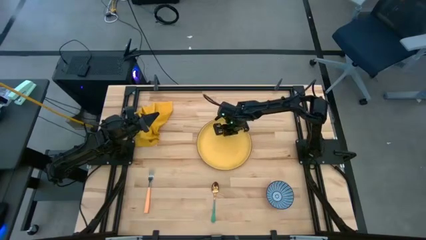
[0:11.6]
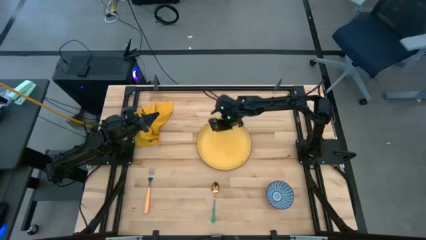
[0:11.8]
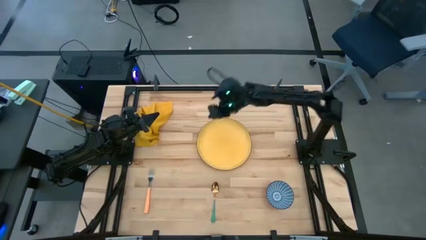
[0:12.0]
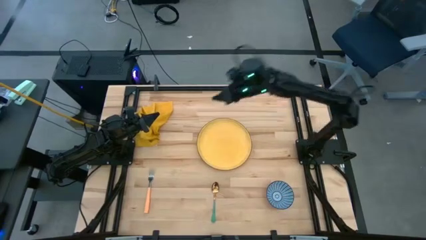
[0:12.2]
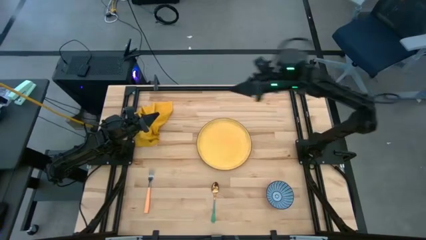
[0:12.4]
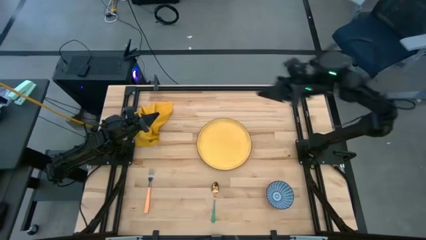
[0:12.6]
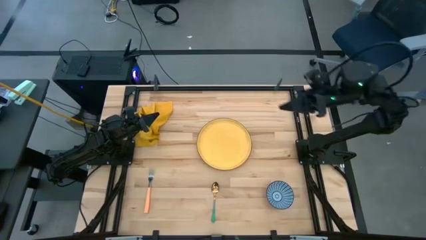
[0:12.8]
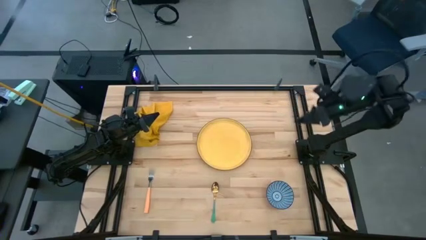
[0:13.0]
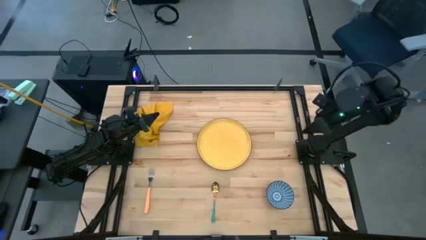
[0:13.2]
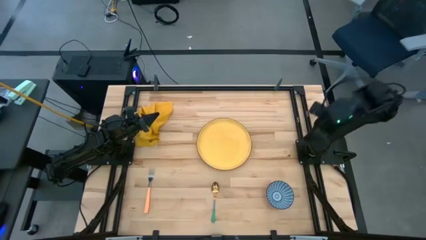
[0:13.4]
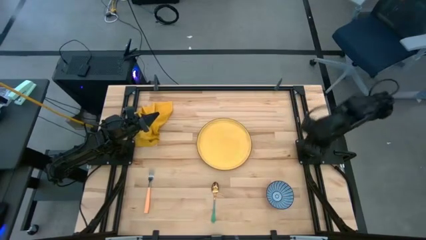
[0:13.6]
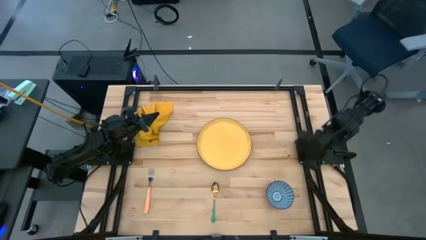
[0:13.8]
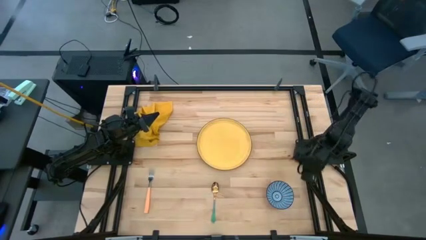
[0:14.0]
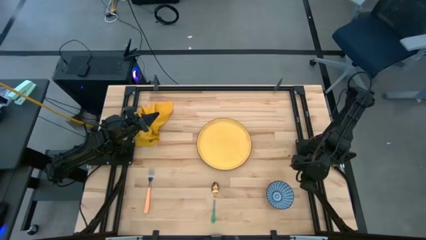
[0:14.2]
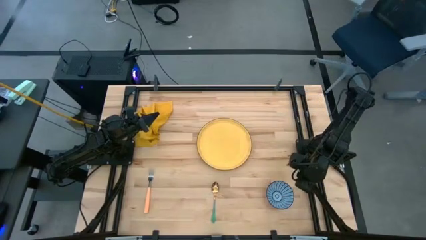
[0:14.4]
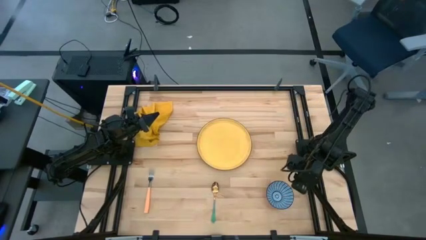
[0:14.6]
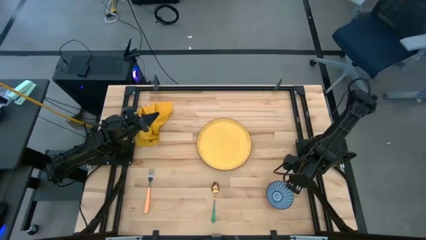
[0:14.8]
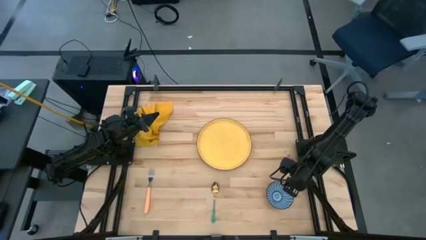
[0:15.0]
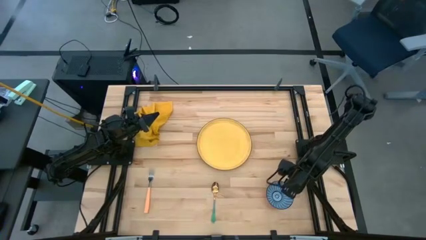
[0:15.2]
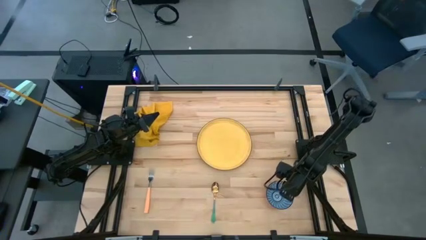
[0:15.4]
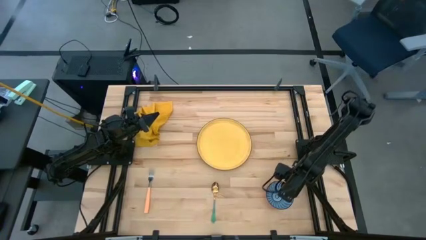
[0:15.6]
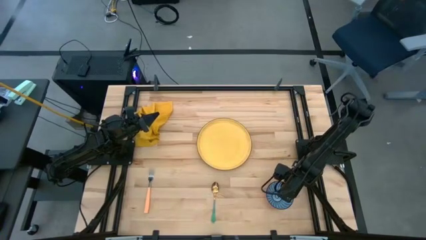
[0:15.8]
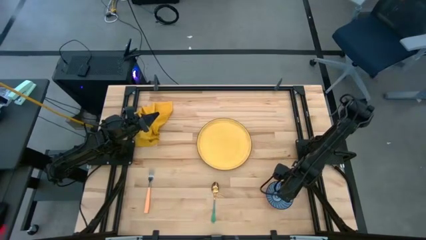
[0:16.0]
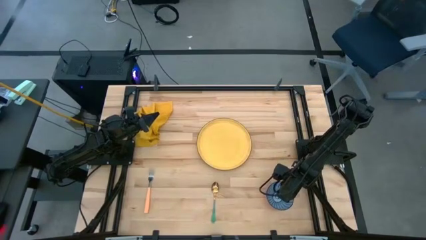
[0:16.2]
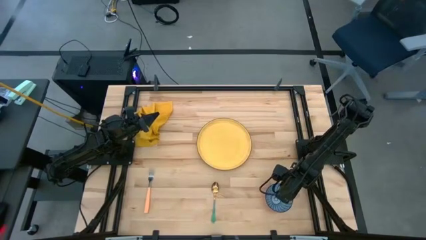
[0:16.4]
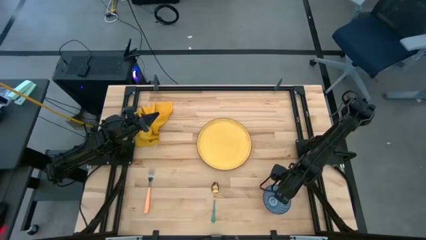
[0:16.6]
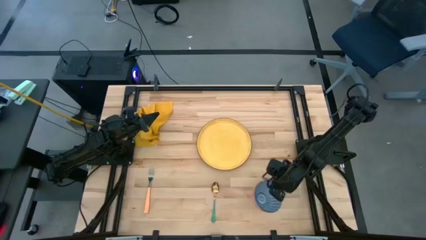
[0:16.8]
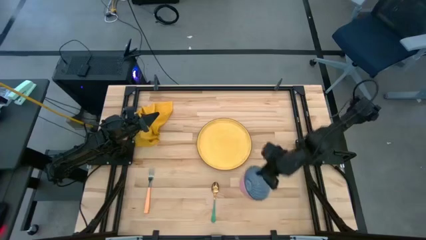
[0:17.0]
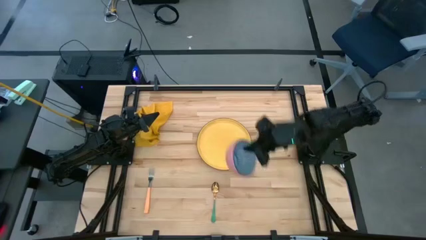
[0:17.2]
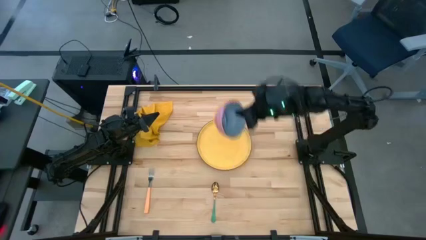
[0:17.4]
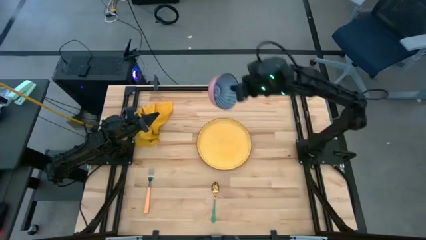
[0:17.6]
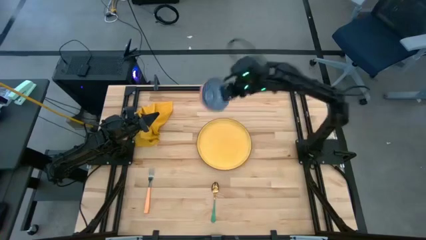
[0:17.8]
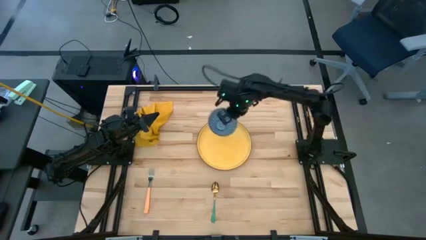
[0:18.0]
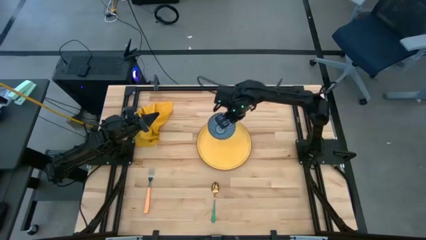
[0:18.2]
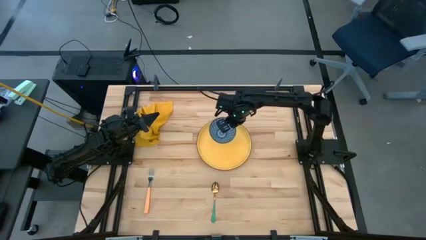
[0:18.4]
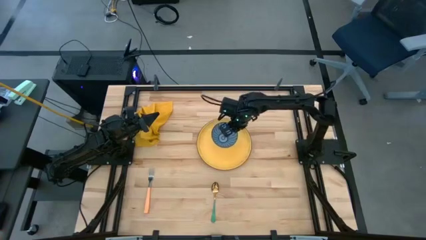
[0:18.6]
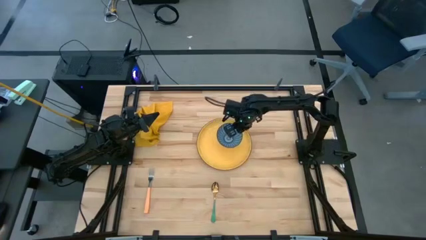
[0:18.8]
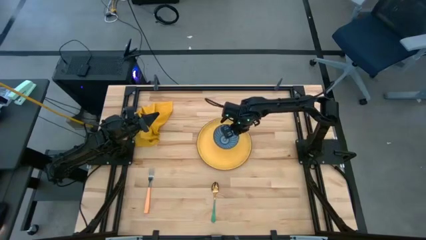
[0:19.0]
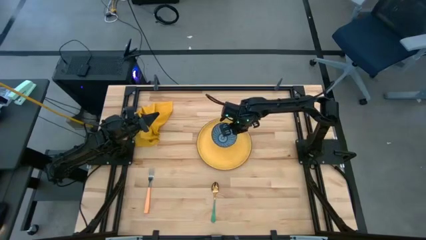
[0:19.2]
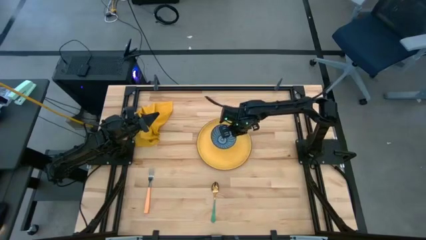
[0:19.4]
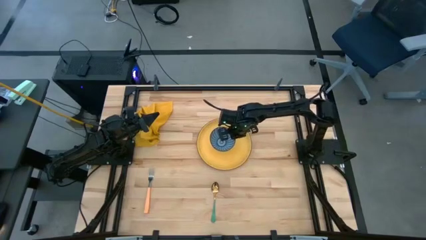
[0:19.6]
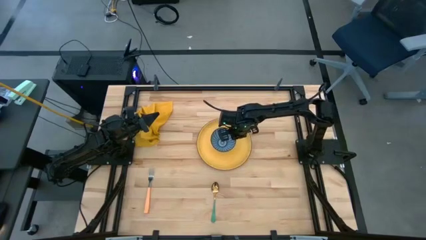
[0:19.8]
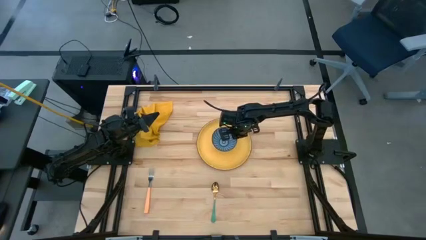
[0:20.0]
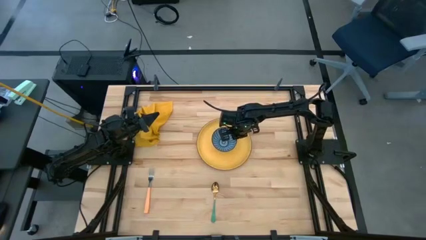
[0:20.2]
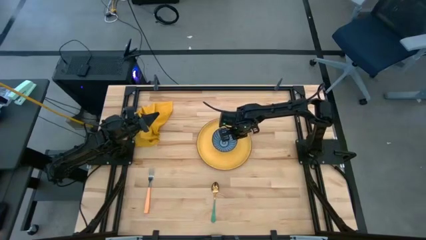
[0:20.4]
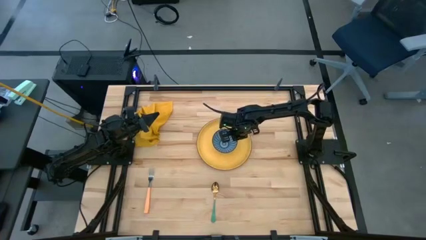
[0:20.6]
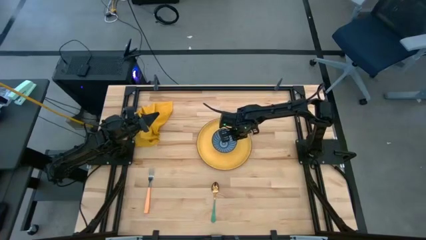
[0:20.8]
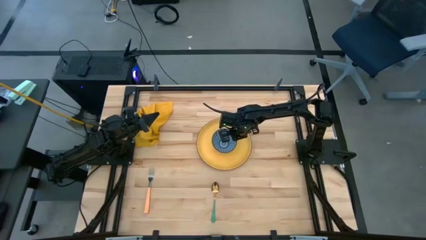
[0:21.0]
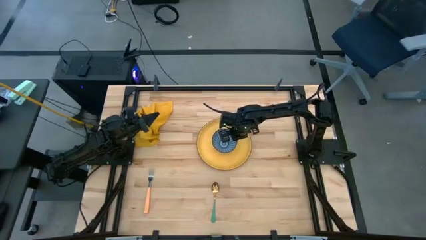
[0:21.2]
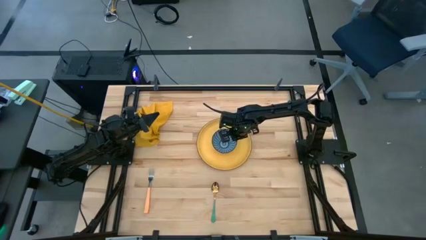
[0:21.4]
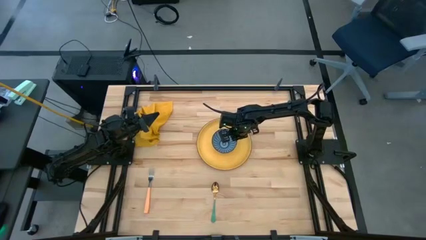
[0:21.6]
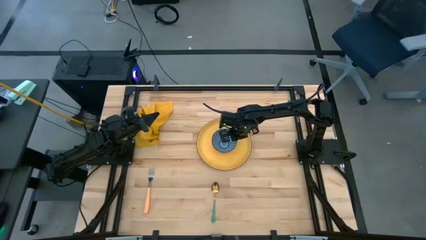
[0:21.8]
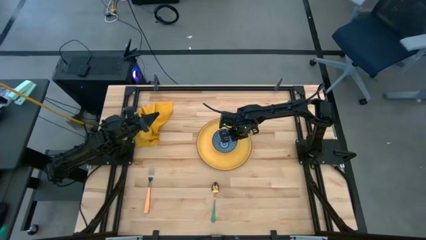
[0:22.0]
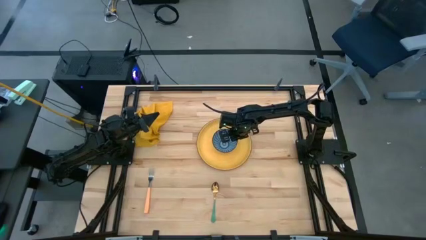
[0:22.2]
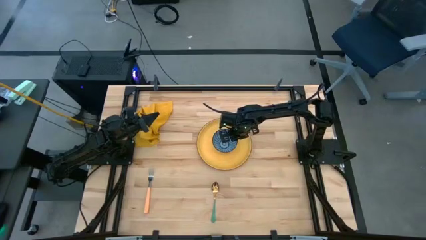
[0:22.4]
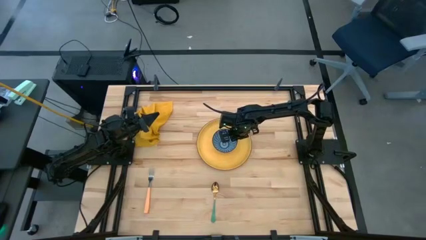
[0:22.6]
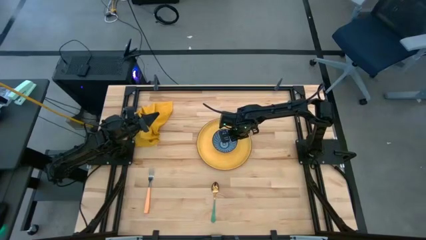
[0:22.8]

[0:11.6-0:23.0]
Task: Set table place
Put the blue bowl on the gold plate
